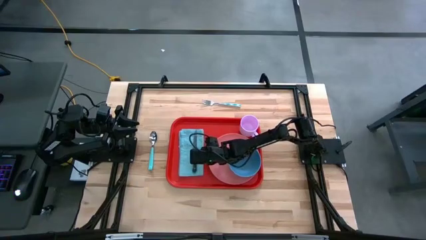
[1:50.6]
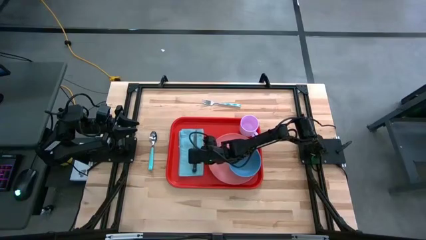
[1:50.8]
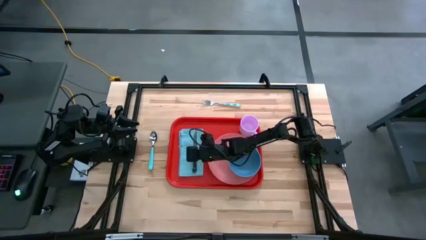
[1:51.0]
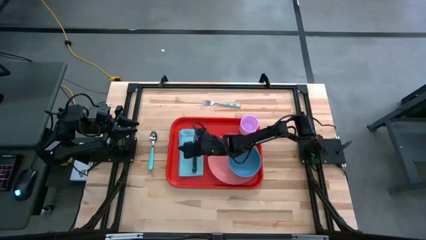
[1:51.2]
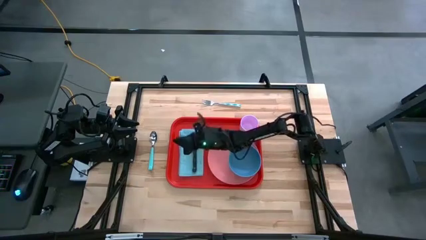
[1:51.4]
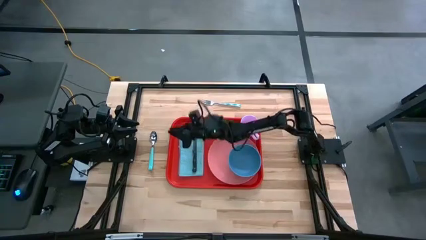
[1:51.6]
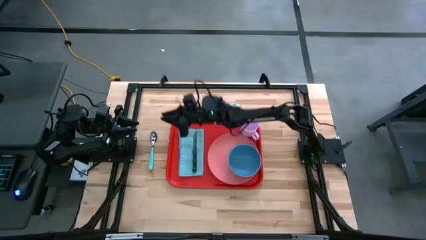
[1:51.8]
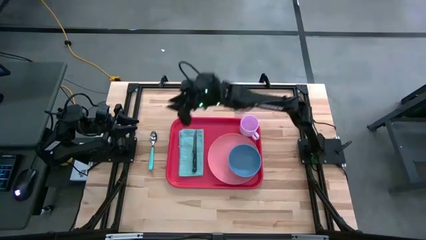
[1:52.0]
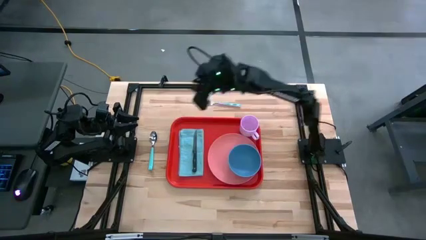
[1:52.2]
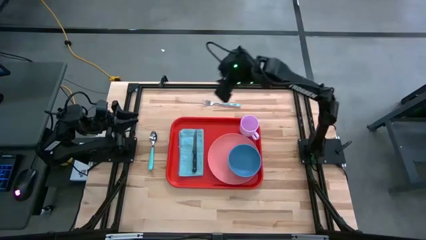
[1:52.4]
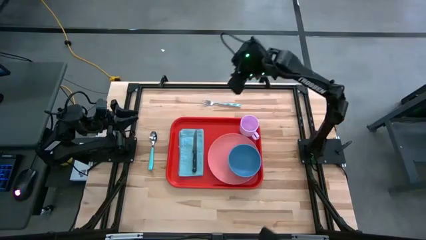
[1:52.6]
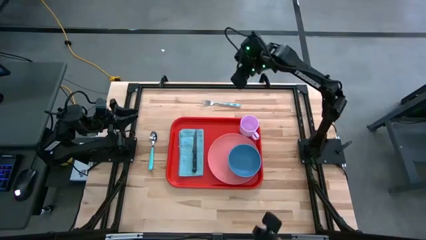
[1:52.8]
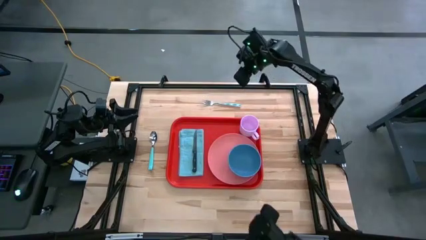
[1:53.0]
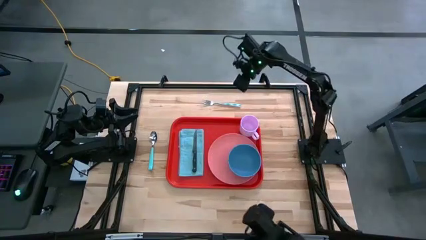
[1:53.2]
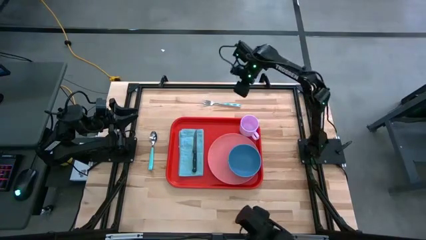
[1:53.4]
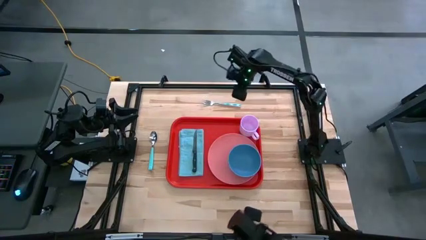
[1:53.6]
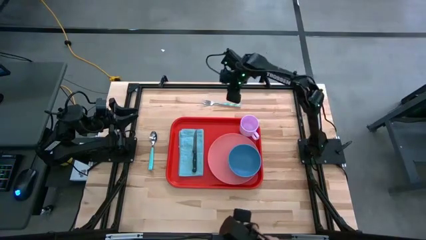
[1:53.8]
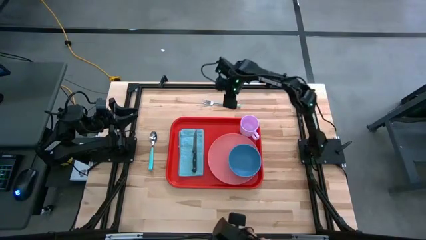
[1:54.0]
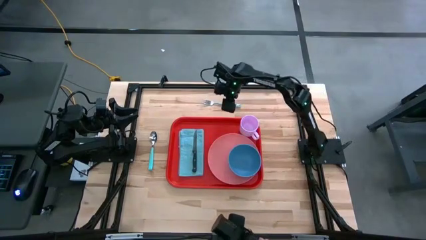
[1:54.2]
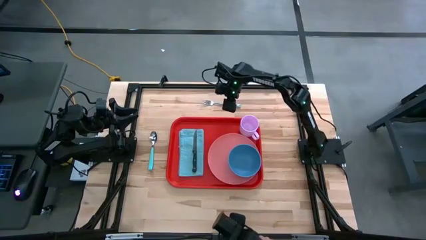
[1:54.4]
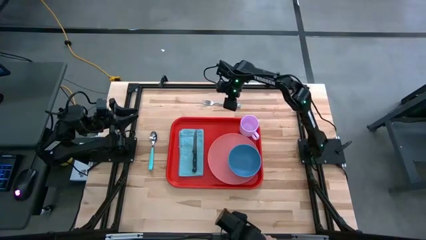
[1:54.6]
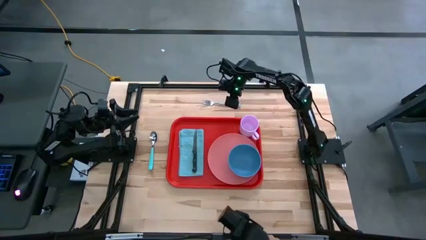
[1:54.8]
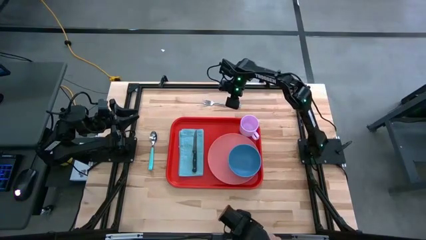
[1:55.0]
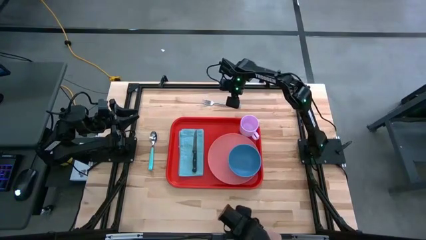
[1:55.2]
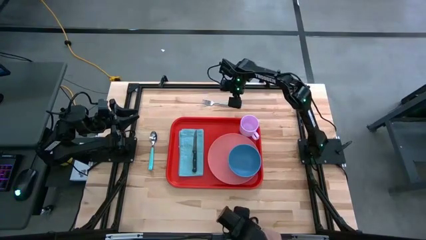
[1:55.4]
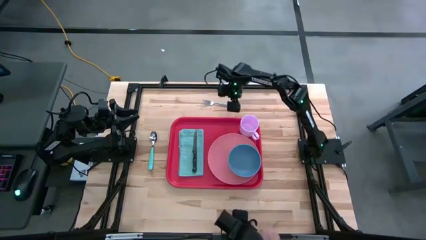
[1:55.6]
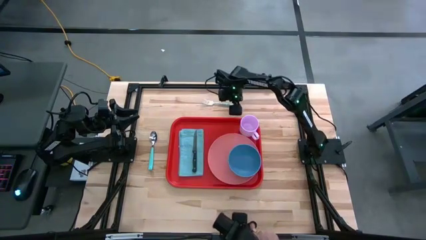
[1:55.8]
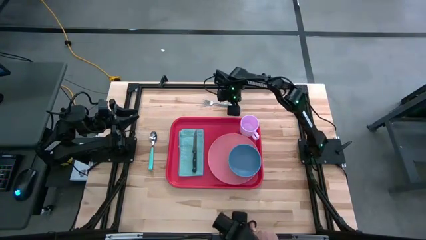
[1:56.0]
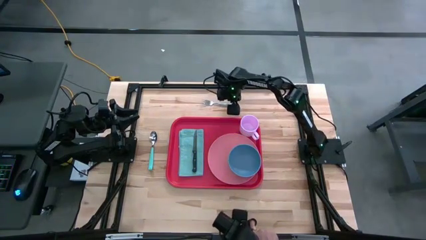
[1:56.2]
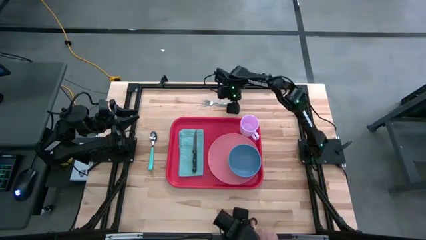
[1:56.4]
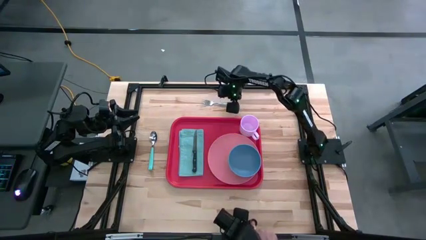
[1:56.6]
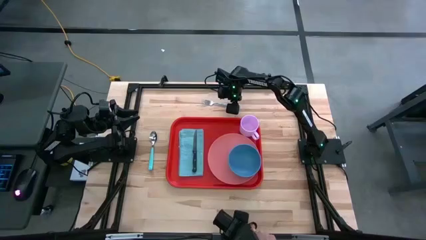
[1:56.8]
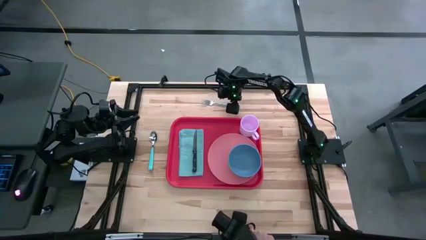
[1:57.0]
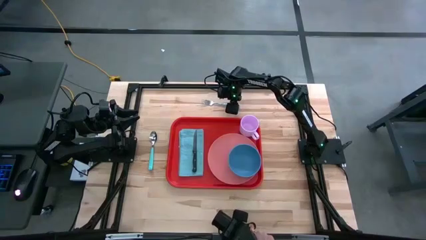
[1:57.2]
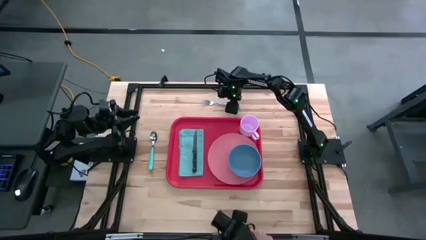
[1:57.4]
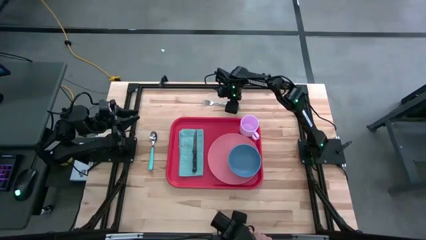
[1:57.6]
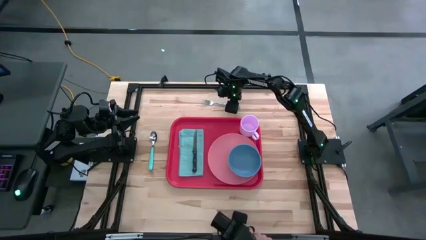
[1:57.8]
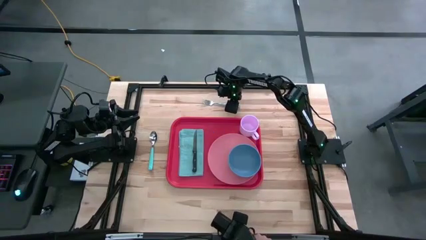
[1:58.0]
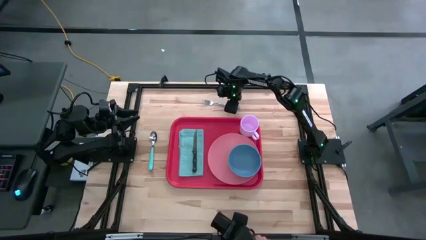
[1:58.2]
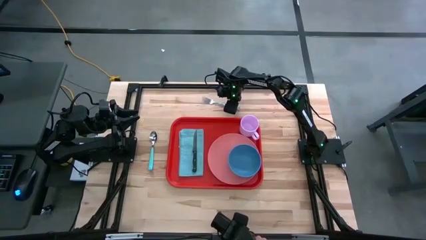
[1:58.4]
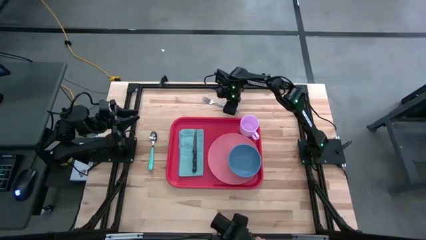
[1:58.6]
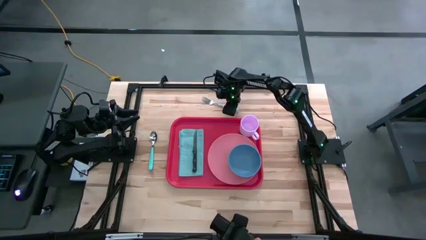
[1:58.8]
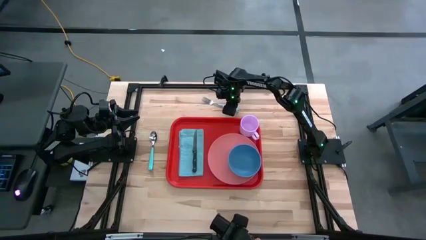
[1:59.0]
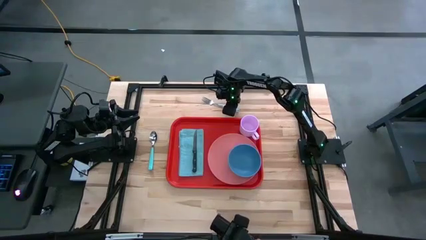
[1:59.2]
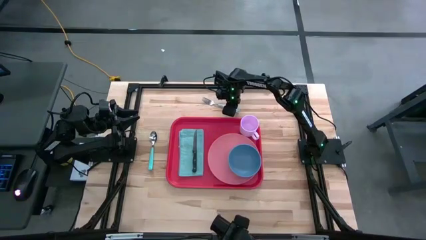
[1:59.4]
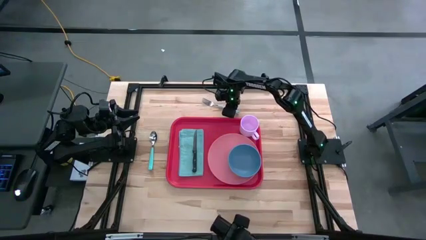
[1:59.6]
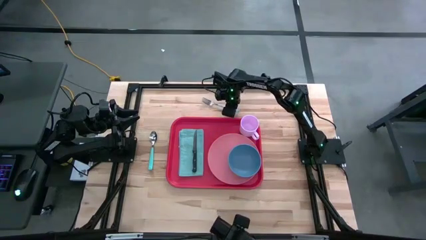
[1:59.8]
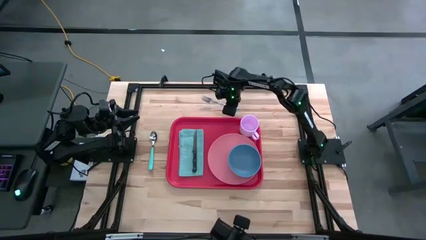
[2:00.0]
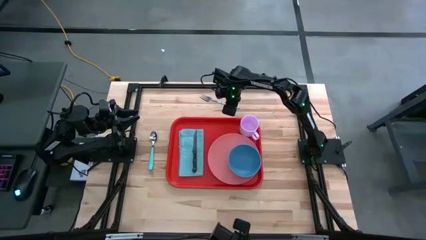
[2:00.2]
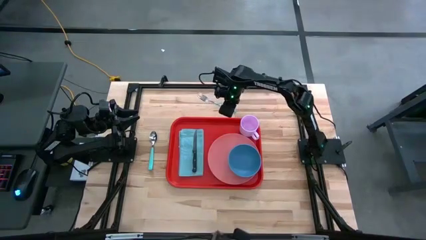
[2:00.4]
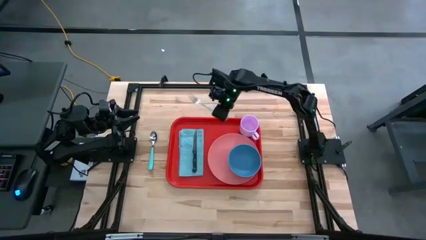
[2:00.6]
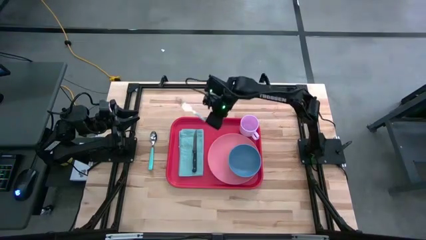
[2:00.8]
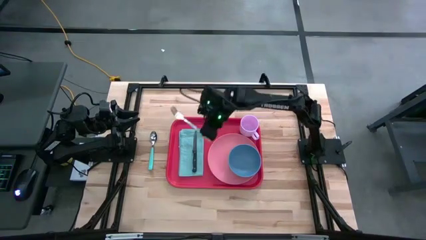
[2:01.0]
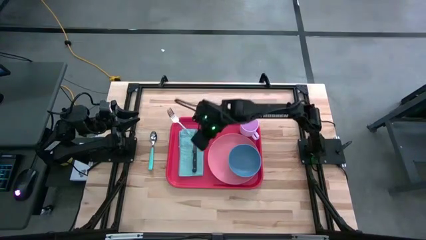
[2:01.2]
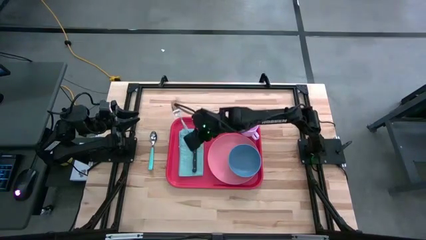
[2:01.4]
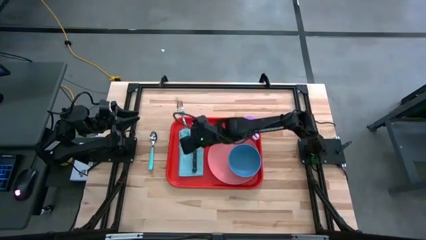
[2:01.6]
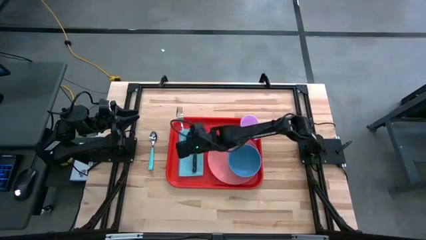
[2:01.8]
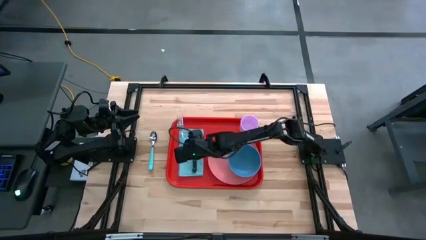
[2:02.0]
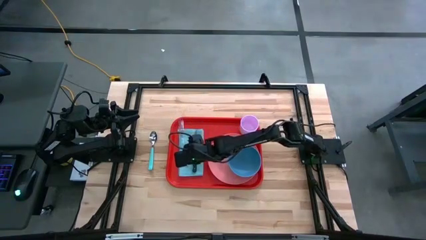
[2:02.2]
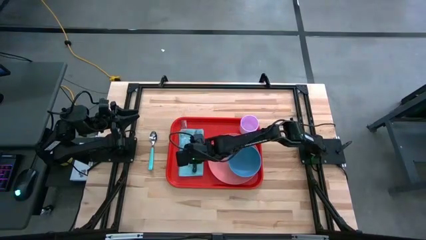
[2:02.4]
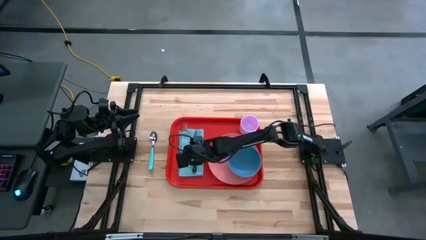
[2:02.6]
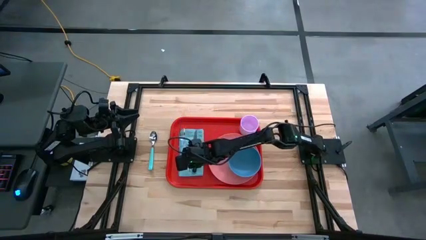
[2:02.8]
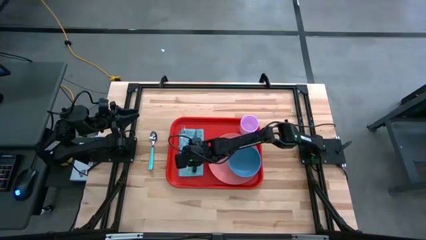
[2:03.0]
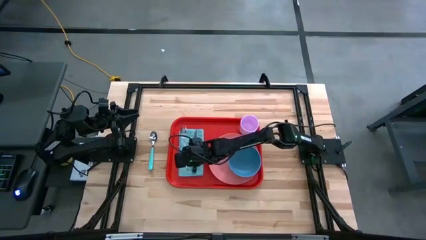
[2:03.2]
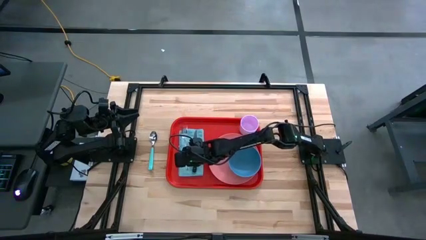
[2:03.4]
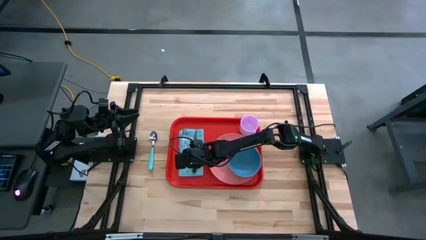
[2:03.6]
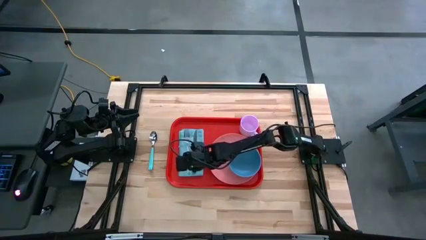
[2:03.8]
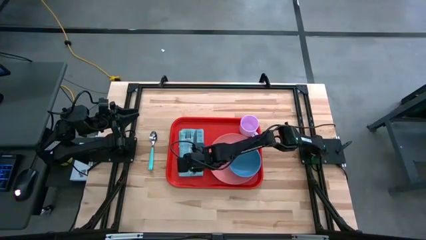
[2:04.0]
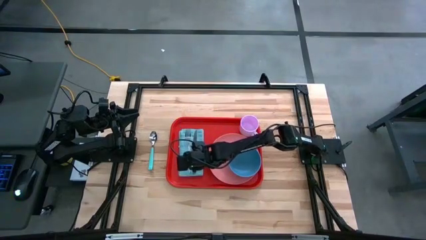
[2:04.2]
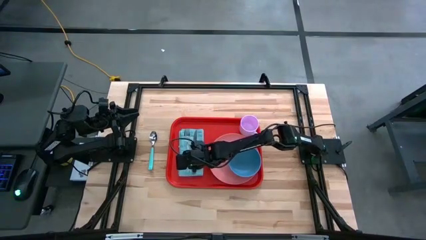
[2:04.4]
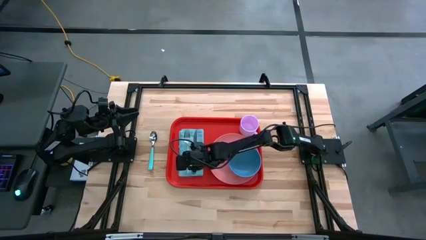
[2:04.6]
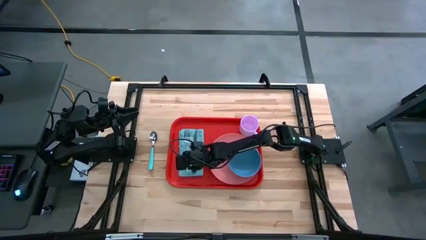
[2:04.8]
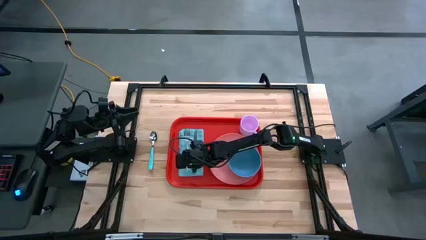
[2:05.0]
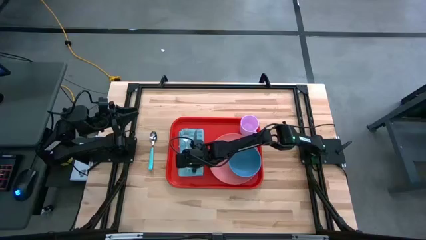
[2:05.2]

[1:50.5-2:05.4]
Task: Set up tray
Put the blue fork on the blue napkin to the left of the black knife

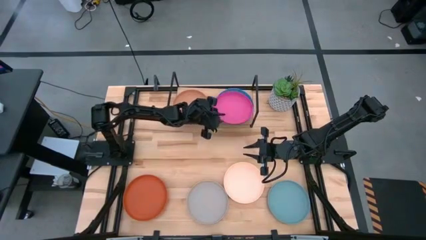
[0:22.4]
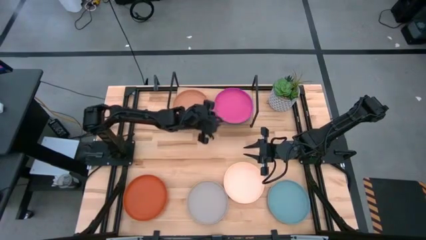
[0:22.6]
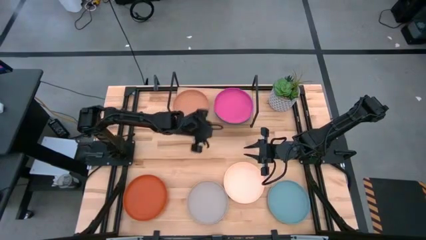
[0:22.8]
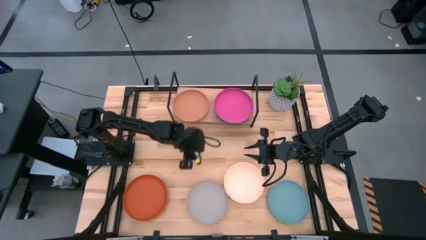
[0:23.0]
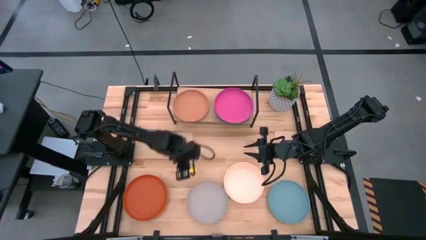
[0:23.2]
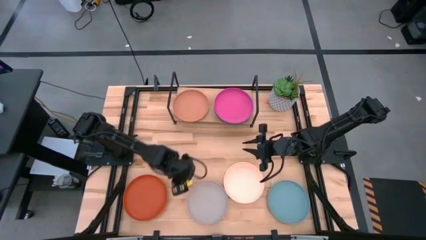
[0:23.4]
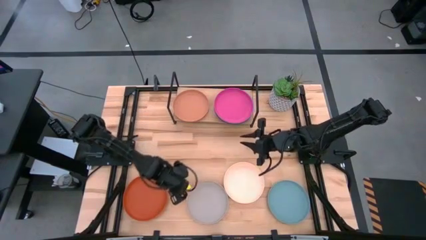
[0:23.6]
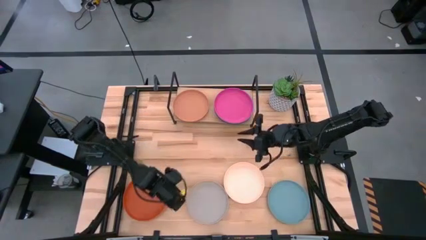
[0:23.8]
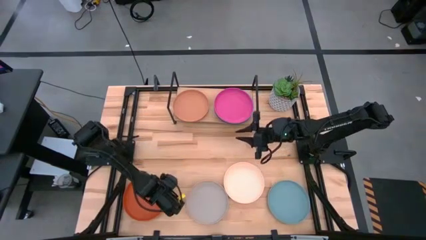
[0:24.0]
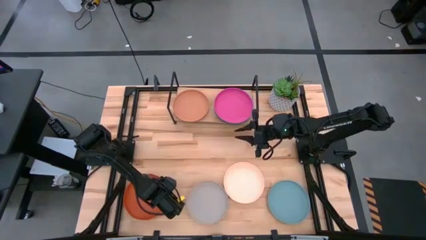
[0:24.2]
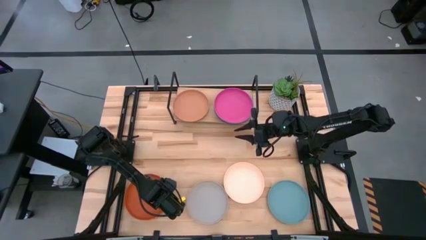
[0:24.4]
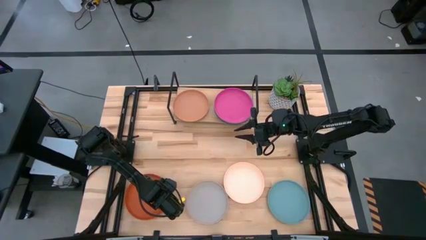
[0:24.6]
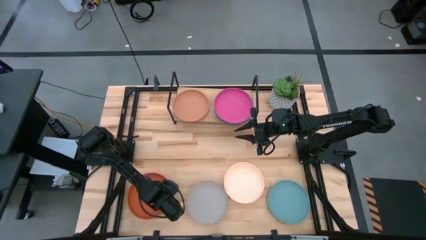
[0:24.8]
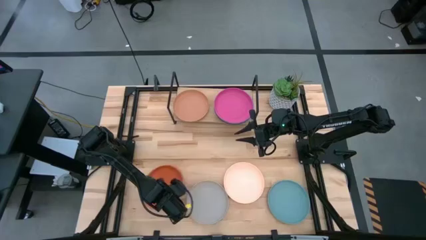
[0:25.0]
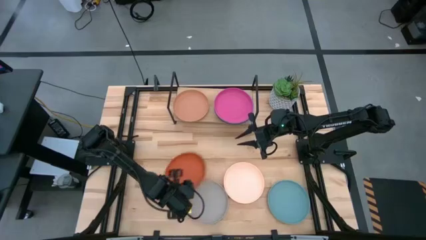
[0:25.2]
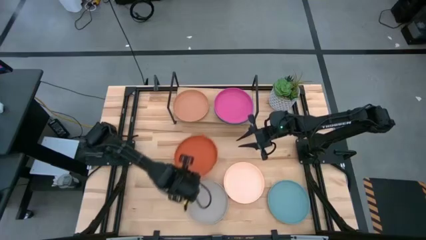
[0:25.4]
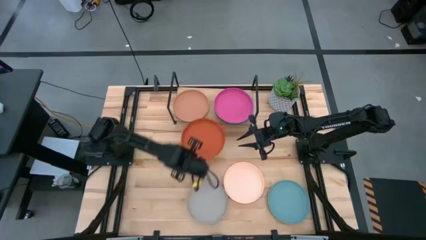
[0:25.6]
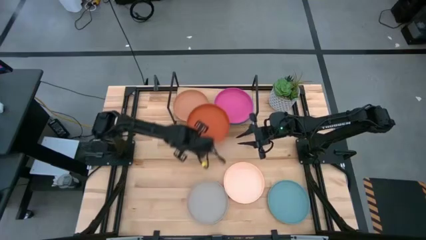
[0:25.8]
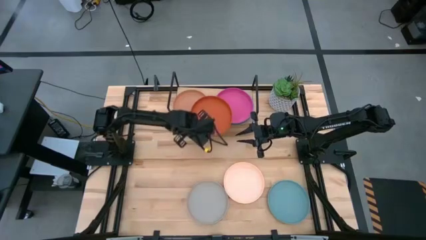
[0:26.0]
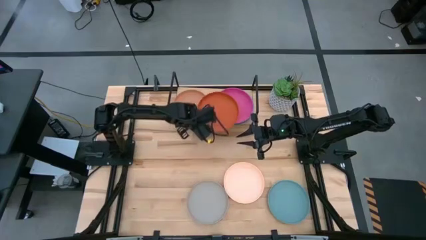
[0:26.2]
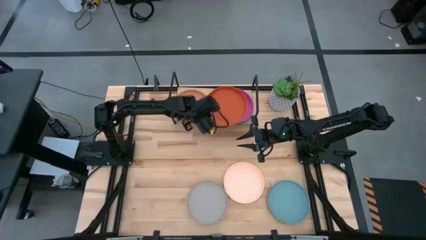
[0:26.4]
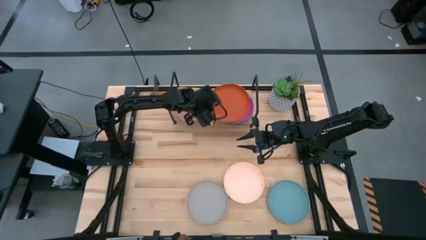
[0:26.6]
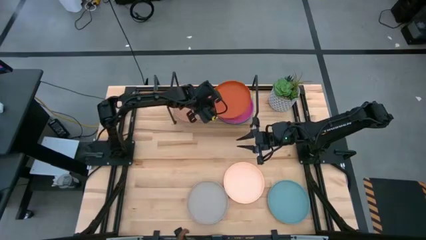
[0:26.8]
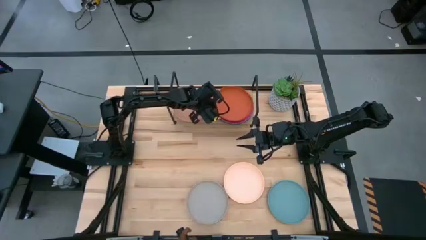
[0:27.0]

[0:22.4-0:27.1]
Task: Place and stack plates onto a shelf
Stack the orange plate on top of the pink plate on the shelf
